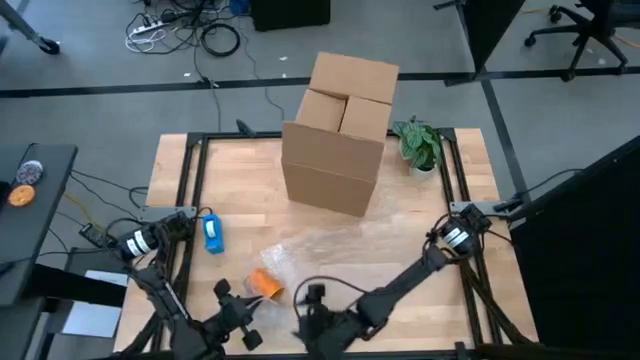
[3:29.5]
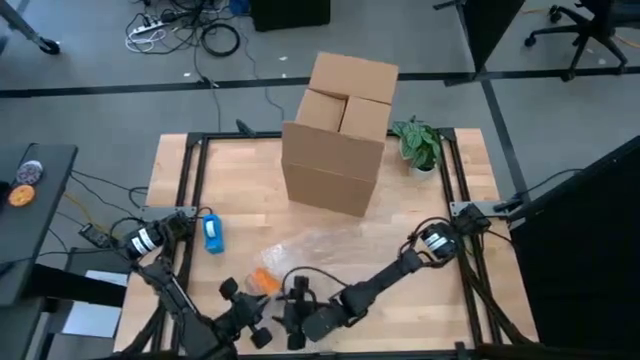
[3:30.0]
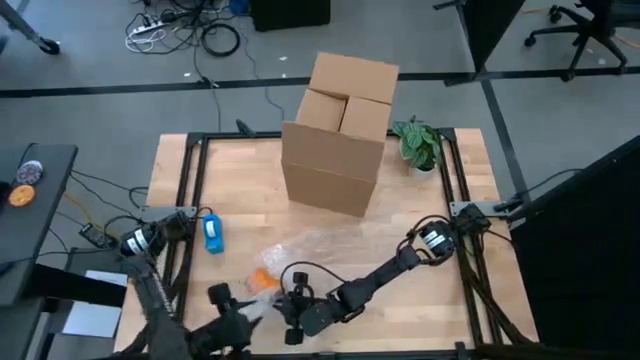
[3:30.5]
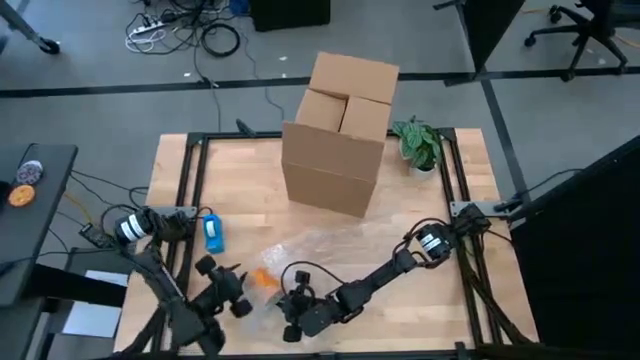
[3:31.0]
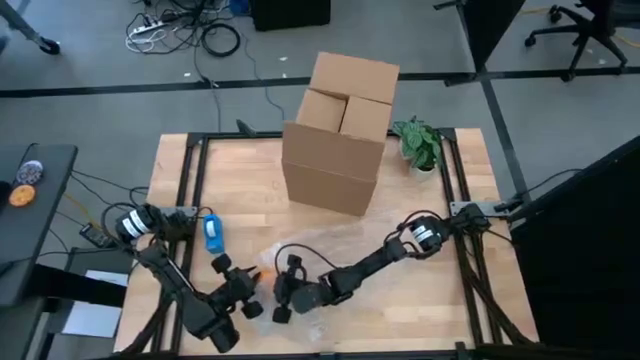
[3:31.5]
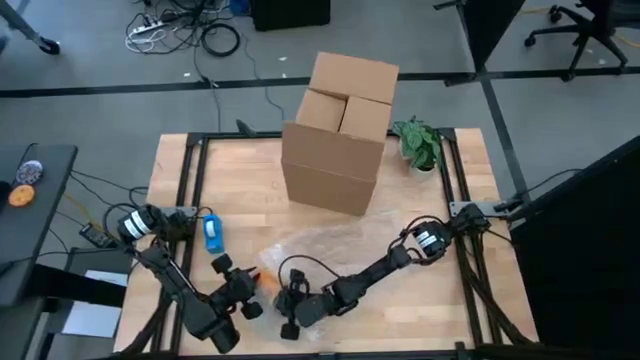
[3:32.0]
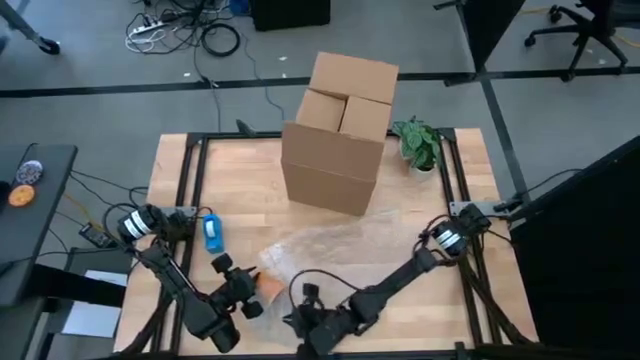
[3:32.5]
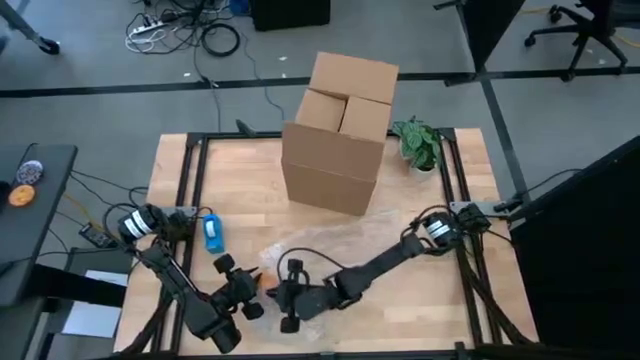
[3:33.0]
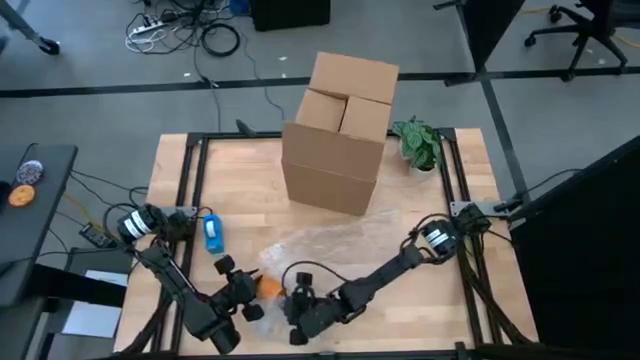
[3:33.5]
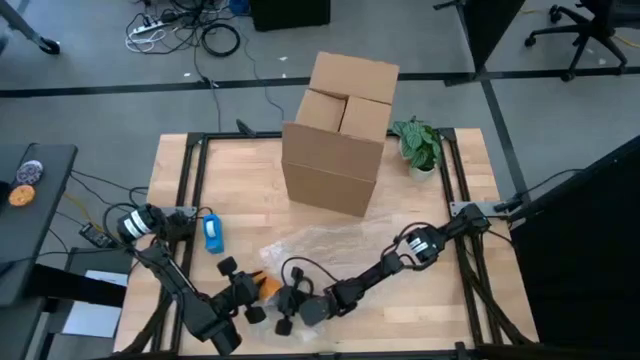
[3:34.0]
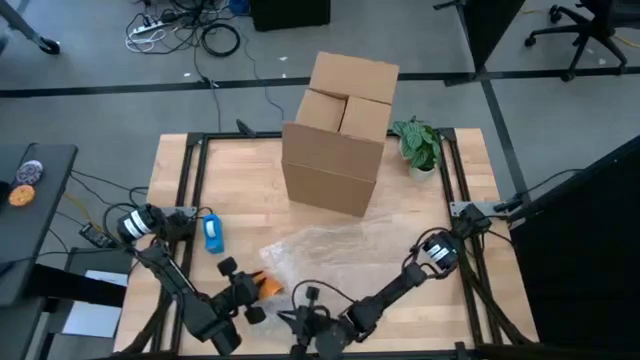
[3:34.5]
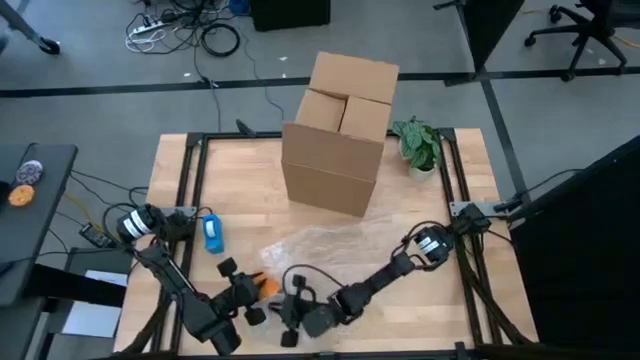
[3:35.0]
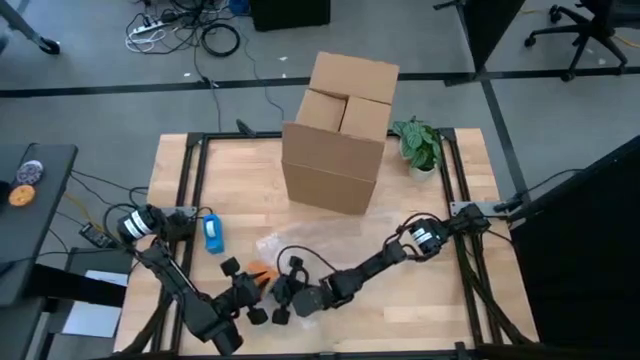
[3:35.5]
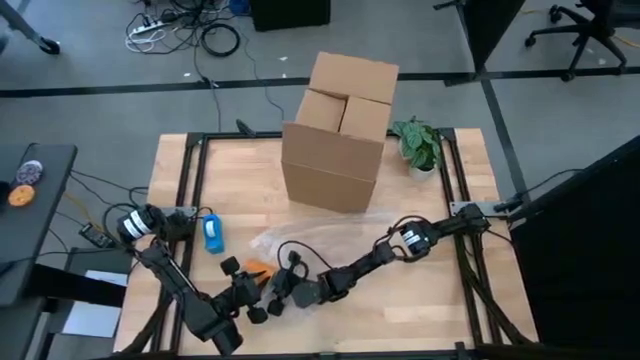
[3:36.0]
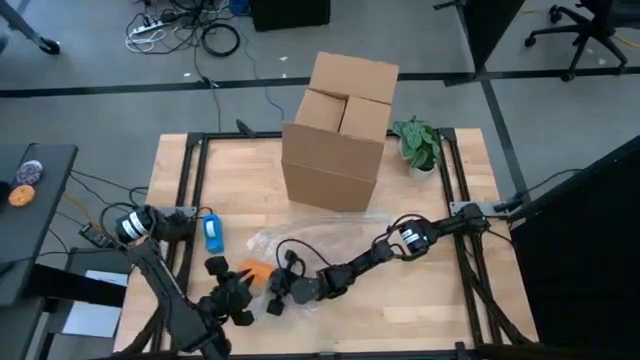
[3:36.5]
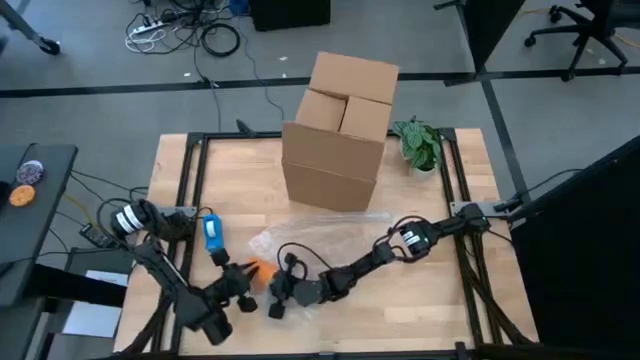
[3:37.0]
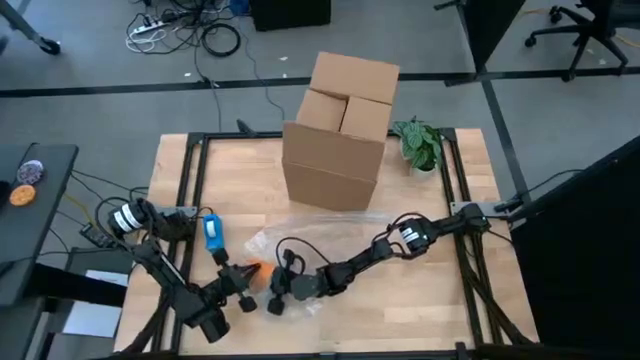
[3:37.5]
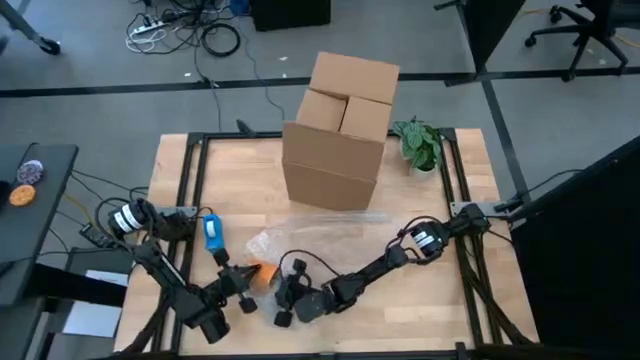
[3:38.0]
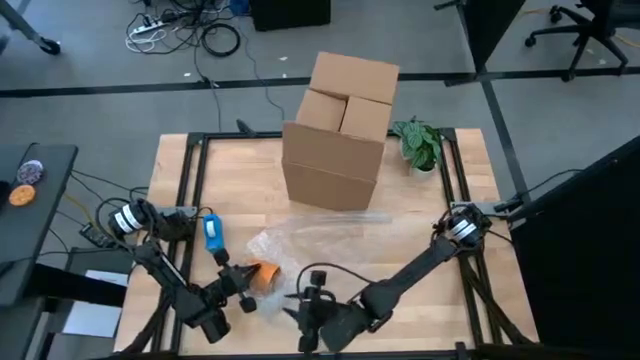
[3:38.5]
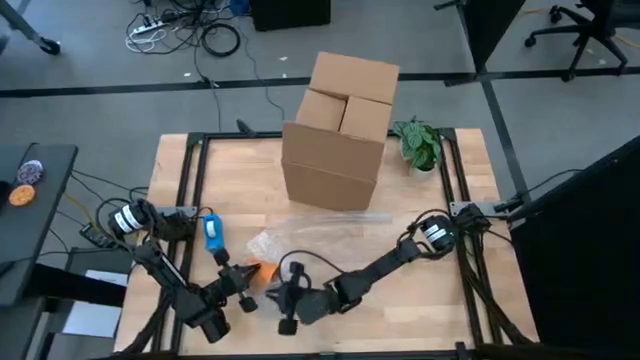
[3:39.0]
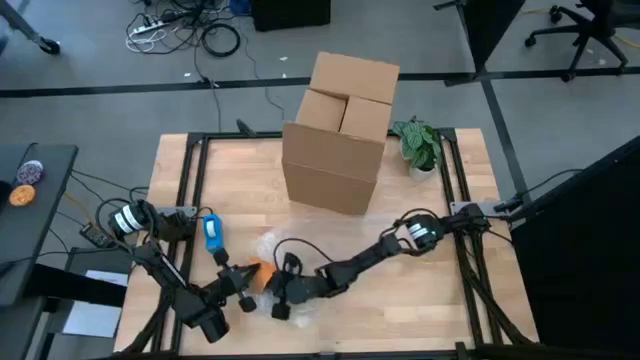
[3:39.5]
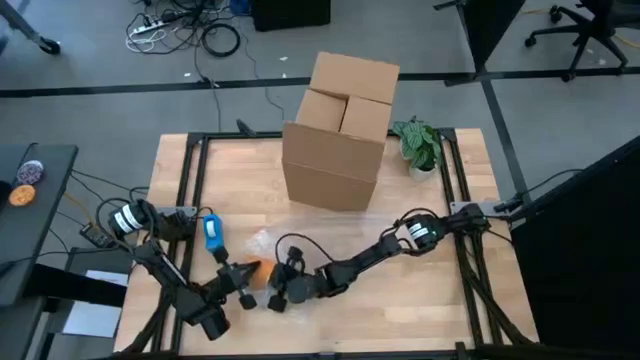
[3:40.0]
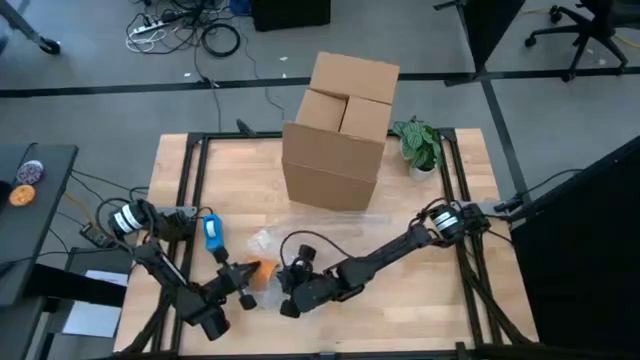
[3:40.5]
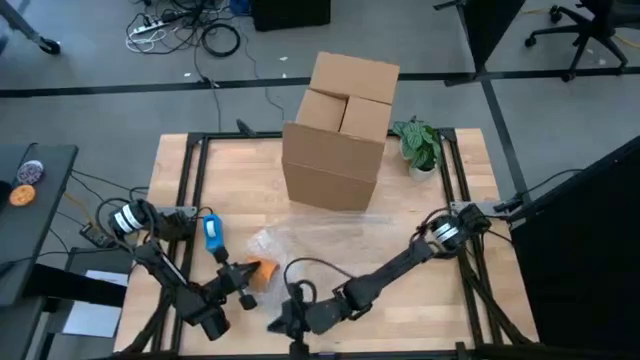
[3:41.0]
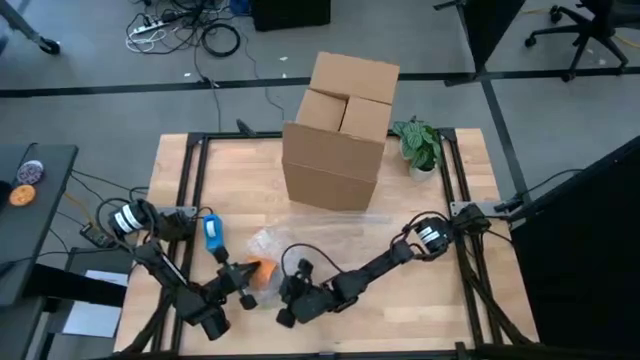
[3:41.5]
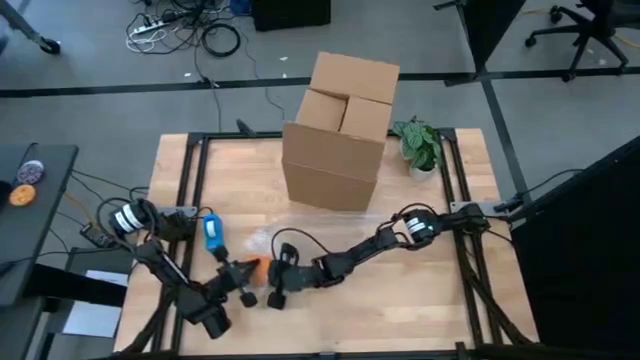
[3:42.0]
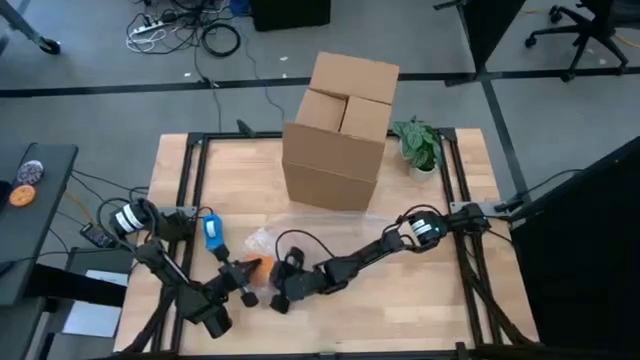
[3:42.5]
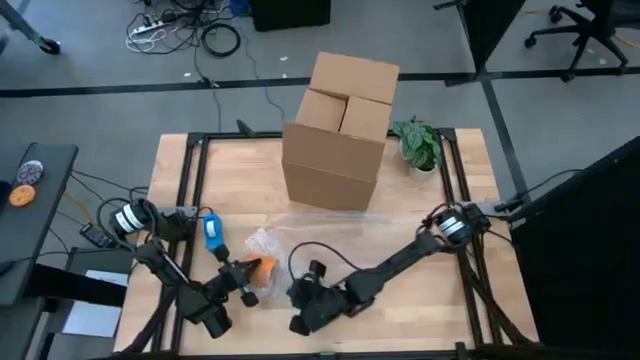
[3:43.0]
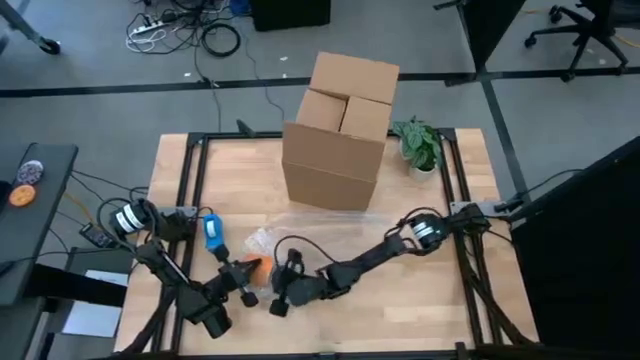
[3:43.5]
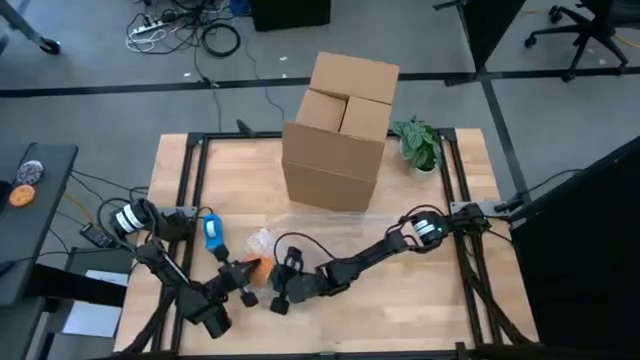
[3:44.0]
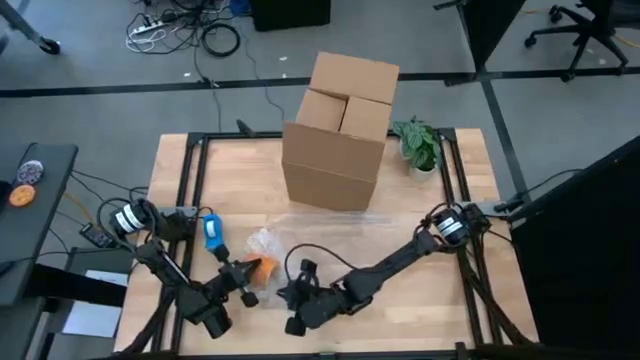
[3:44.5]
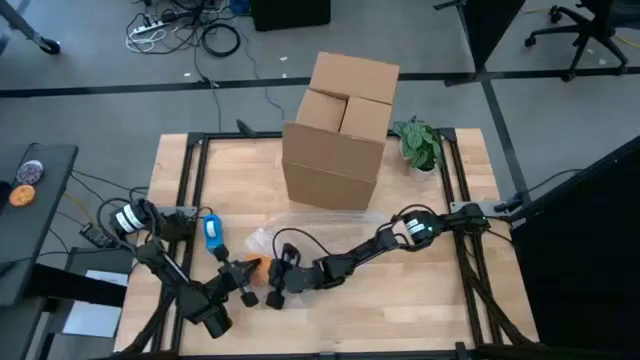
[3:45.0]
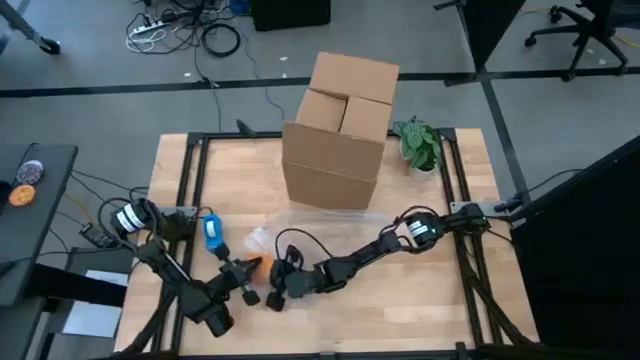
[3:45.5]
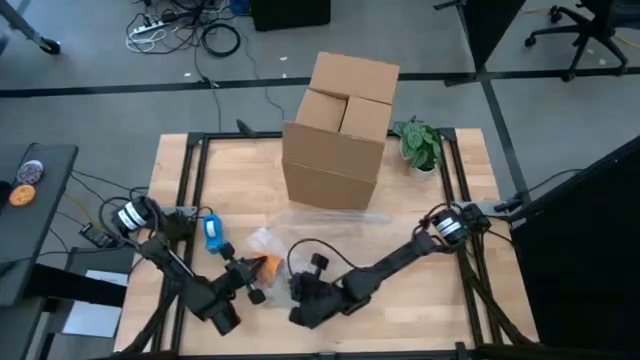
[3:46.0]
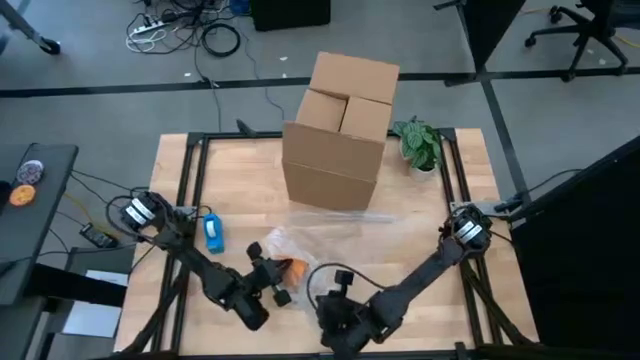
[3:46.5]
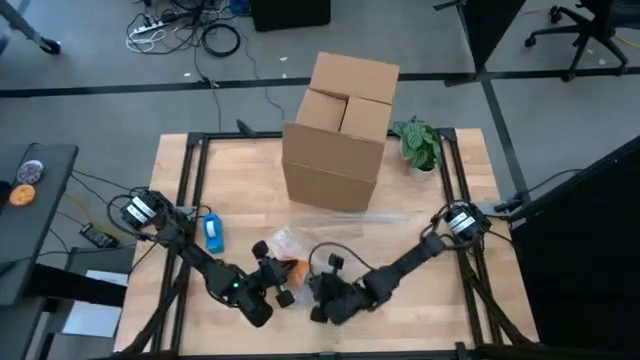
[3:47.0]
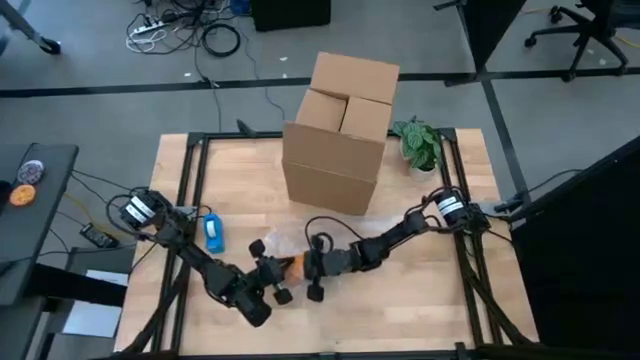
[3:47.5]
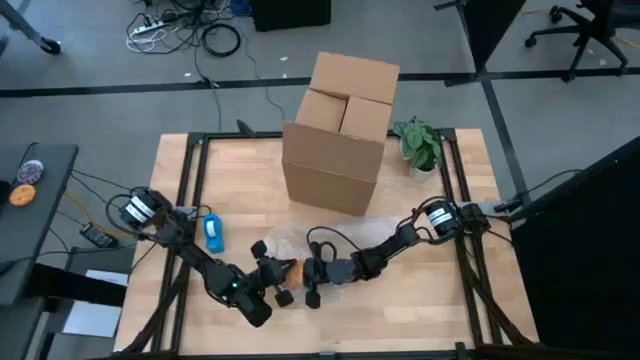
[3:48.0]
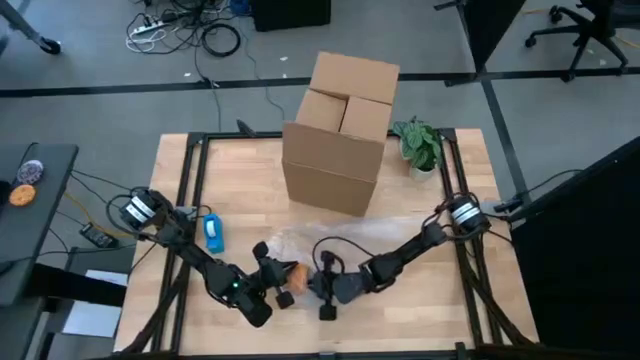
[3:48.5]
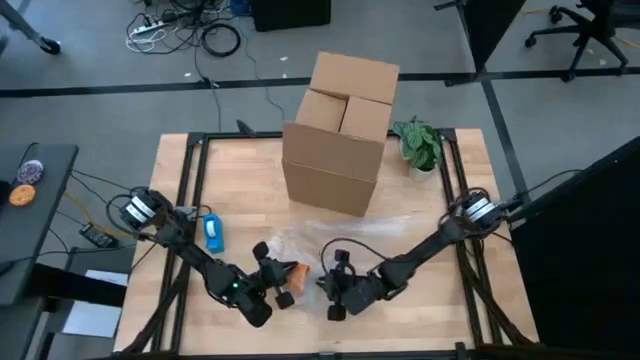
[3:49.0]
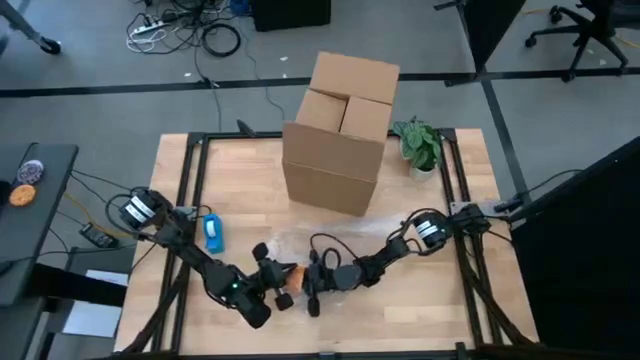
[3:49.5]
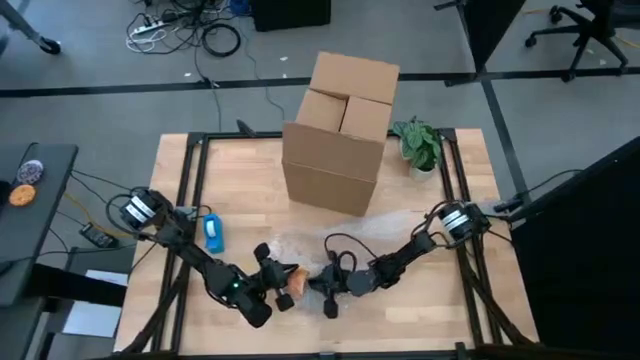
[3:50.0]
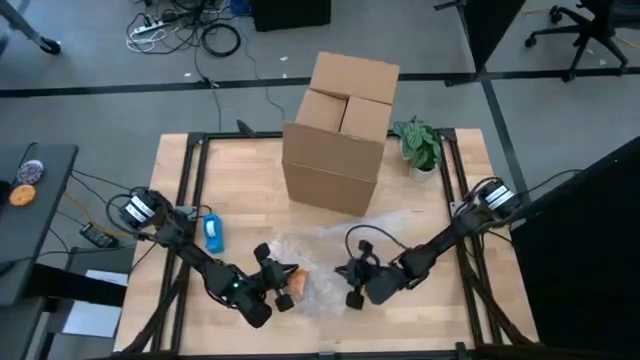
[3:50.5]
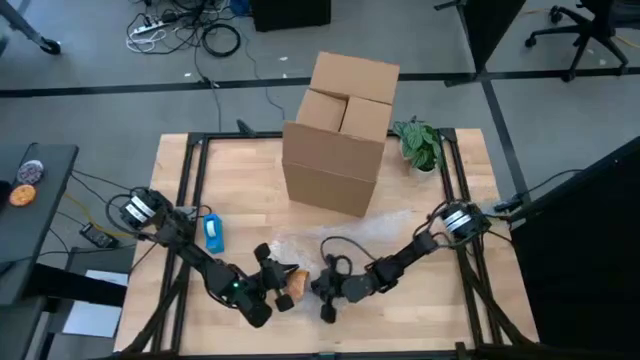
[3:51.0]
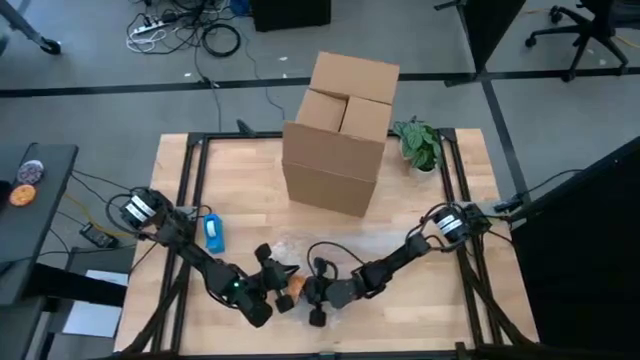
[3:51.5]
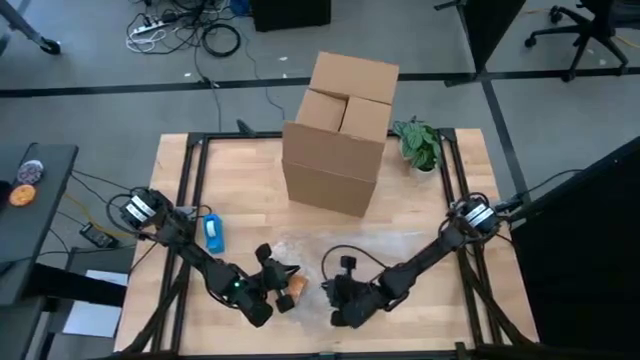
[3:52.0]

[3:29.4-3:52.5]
Task: wrap mug
Wrap the orange mug using the transparent bubble wrap
